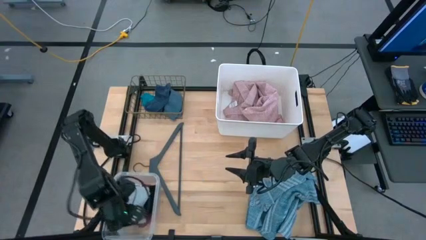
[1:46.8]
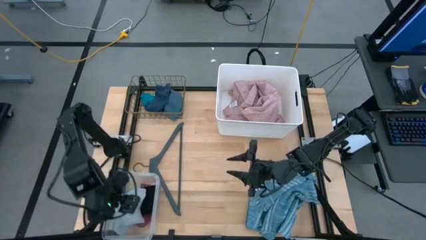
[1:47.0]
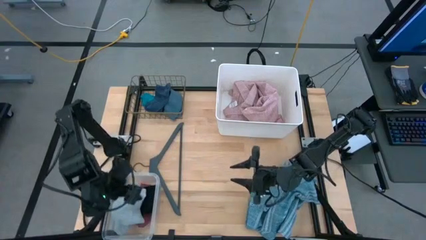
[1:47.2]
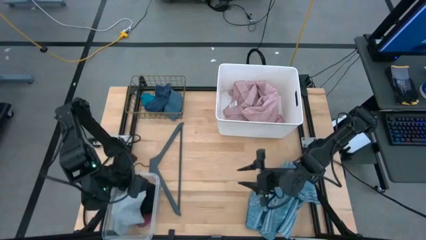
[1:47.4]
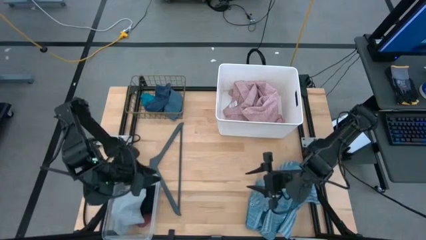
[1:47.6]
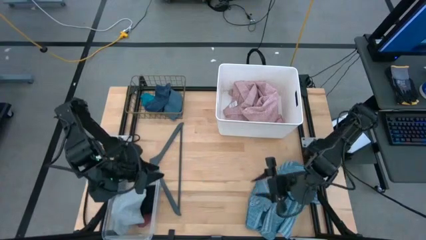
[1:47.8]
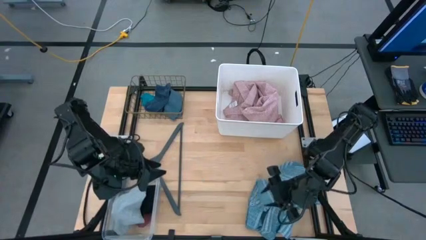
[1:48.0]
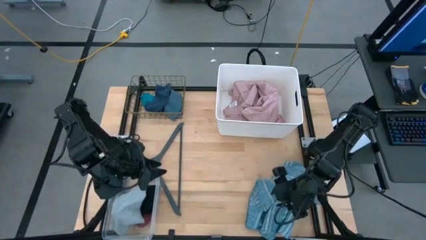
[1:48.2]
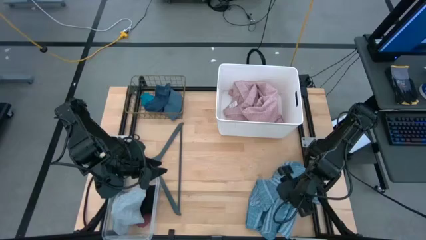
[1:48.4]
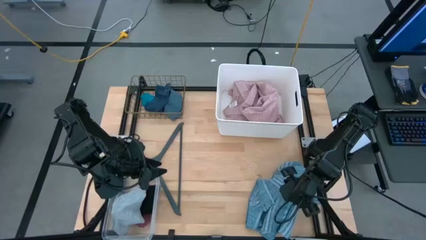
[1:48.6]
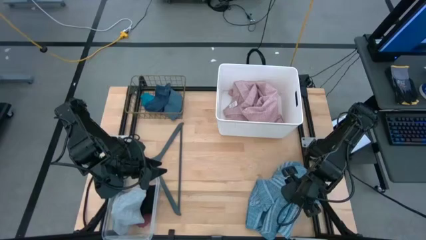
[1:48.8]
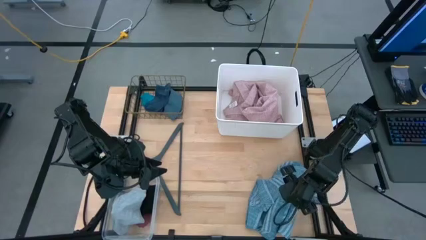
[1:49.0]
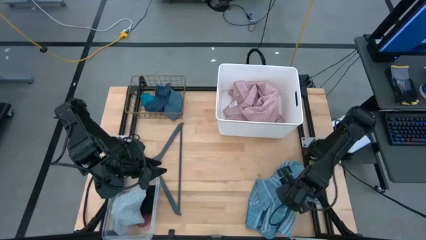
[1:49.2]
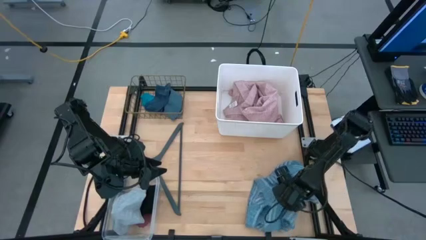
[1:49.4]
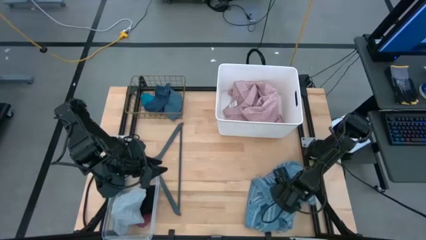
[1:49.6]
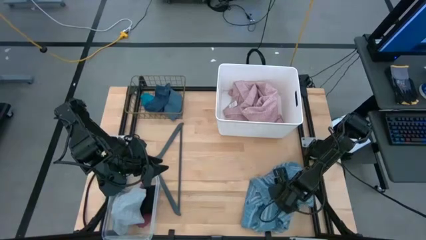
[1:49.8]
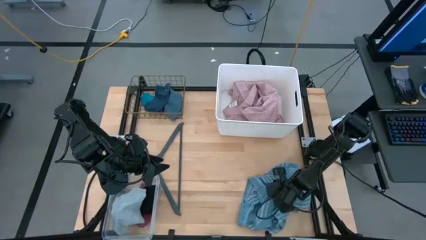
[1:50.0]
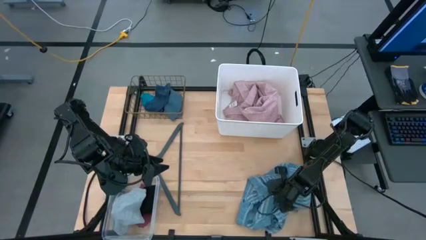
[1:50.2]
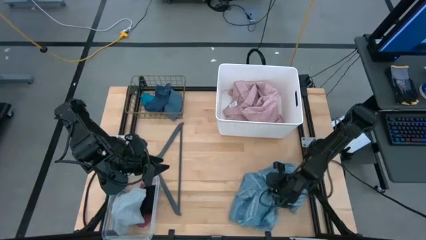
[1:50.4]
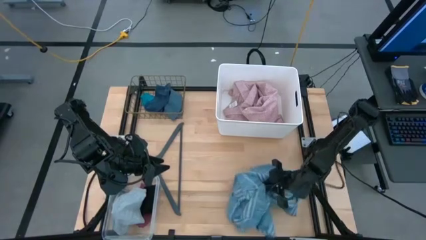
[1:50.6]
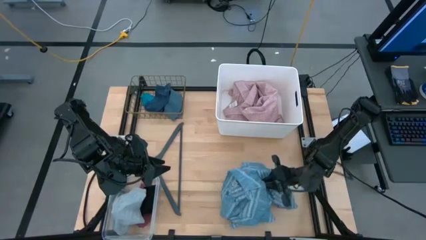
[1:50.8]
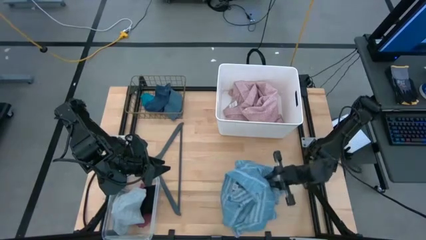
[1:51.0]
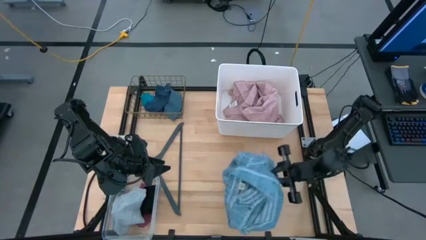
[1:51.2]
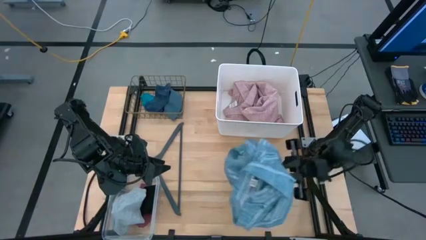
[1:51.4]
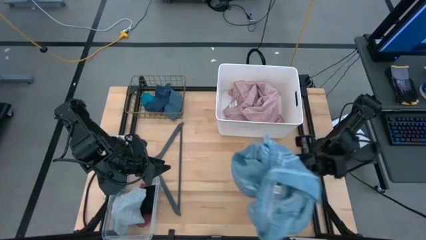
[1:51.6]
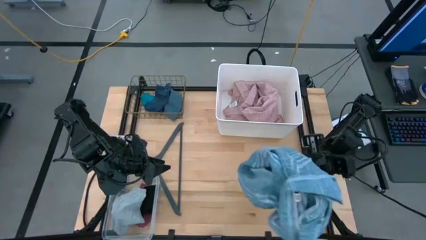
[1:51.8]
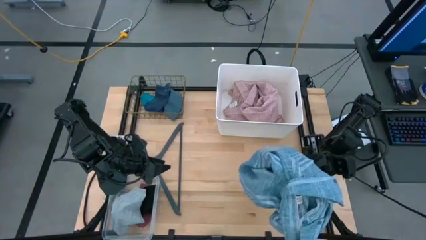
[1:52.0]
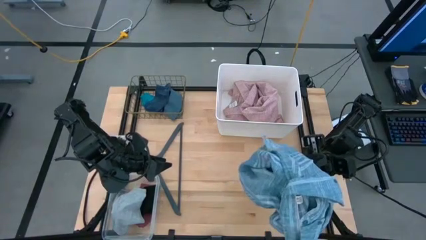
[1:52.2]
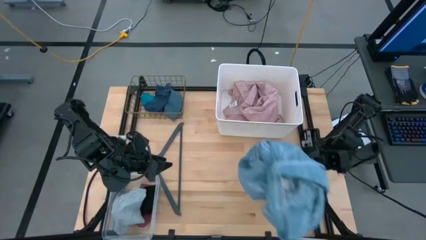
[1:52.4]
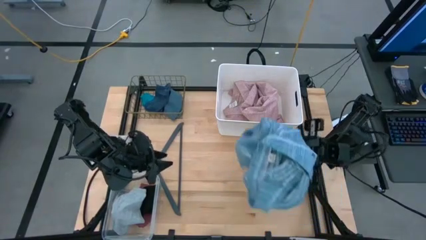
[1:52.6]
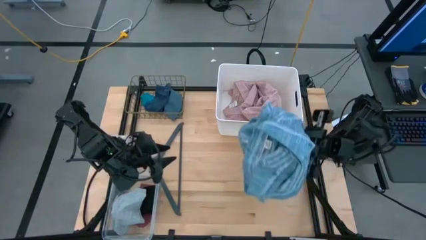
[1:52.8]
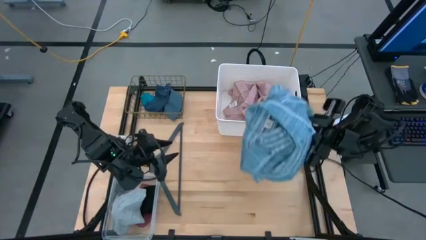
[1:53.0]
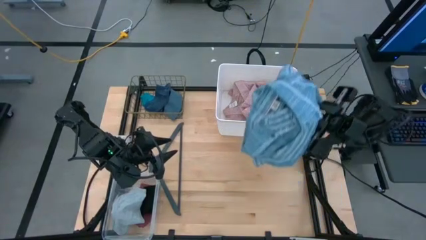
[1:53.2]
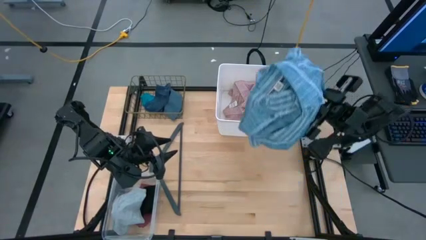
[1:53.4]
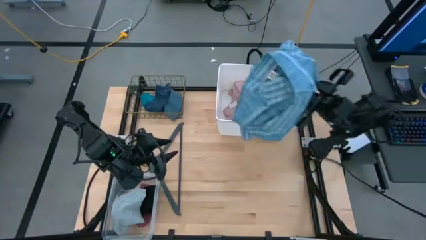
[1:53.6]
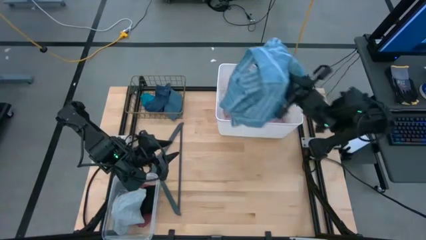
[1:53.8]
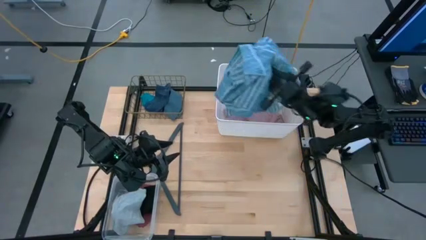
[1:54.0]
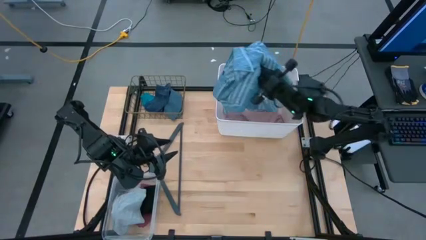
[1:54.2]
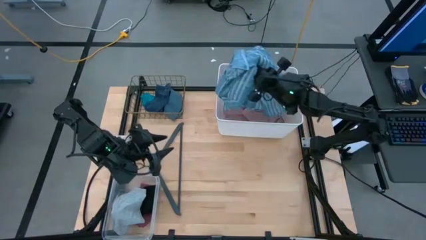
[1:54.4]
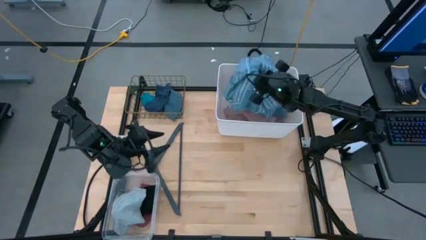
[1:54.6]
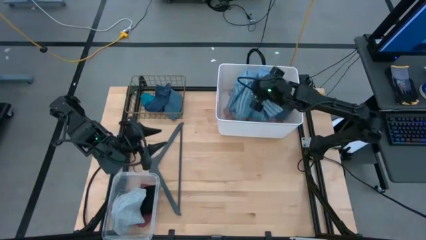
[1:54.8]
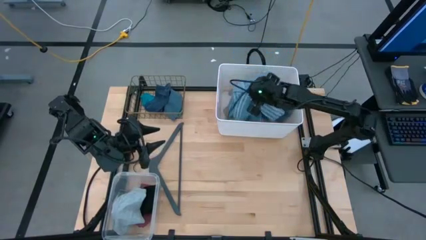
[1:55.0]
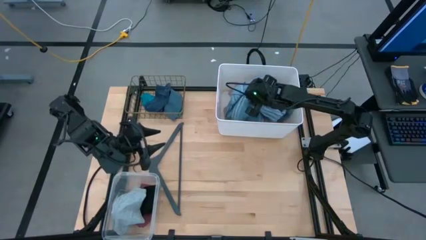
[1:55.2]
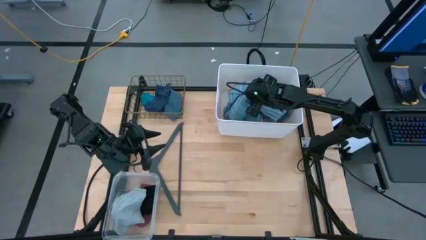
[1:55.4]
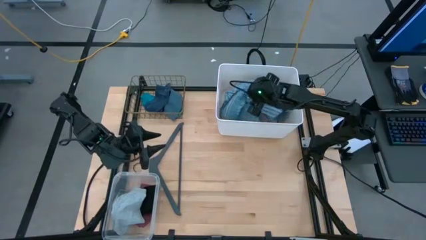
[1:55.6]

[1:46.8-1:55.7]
Task: Pick & Place Cloths
Put the blue long sleeve in the white bin

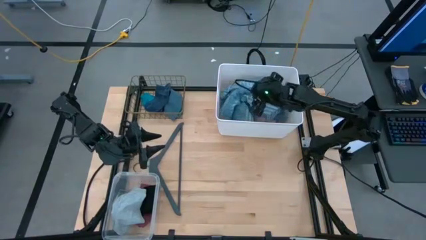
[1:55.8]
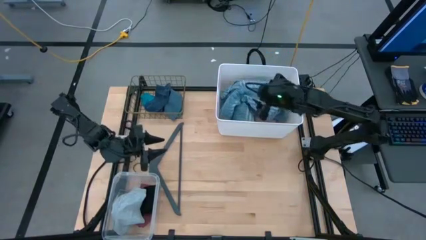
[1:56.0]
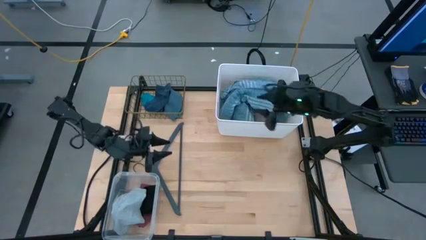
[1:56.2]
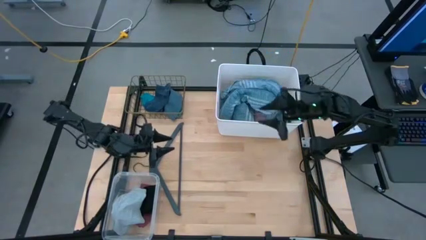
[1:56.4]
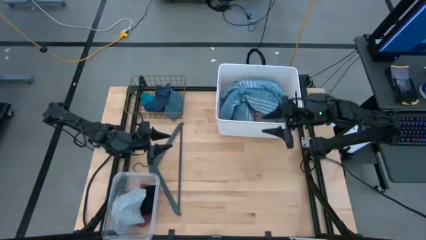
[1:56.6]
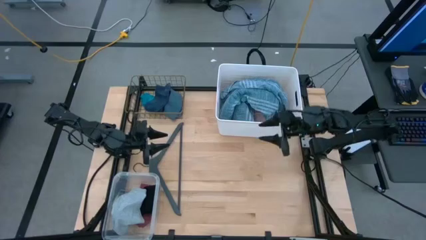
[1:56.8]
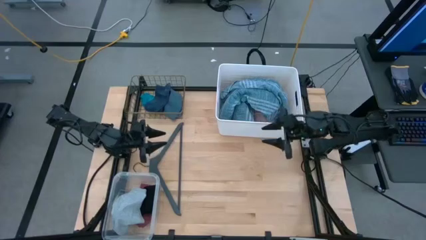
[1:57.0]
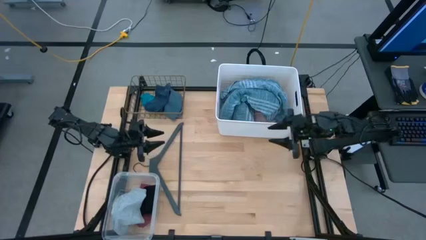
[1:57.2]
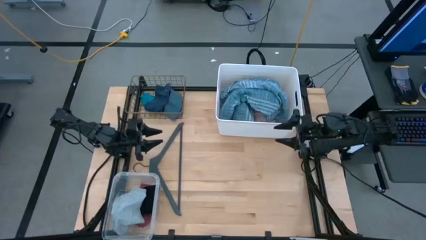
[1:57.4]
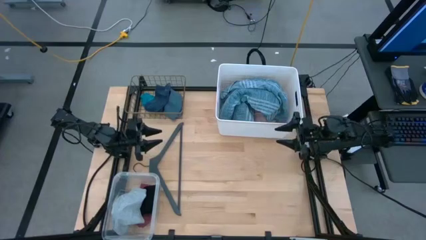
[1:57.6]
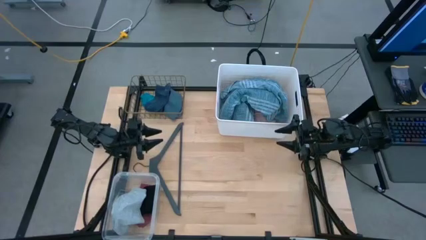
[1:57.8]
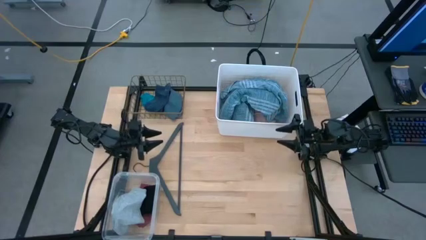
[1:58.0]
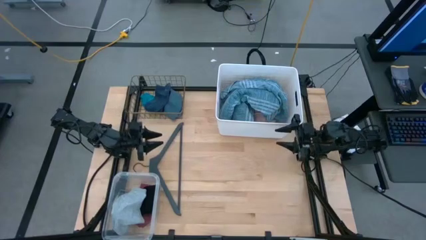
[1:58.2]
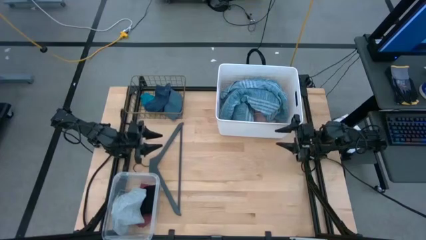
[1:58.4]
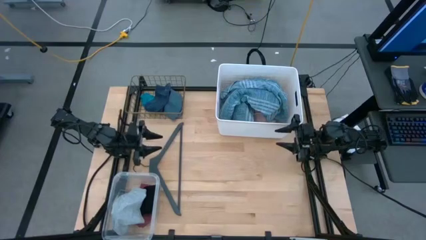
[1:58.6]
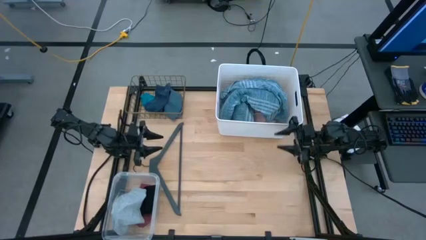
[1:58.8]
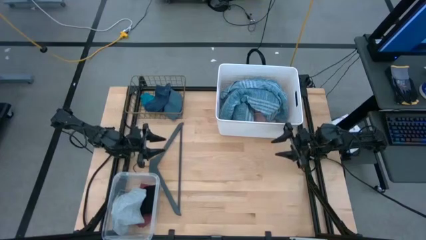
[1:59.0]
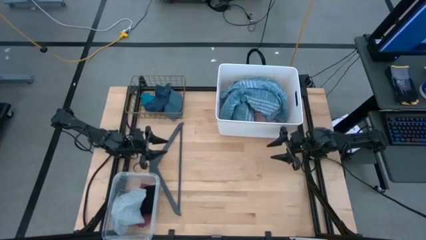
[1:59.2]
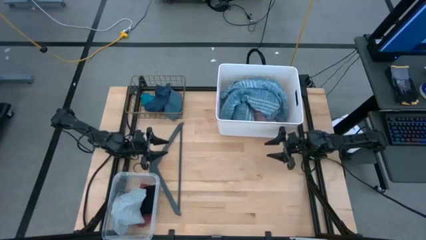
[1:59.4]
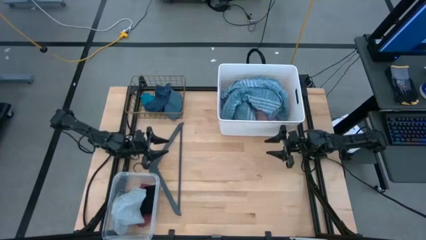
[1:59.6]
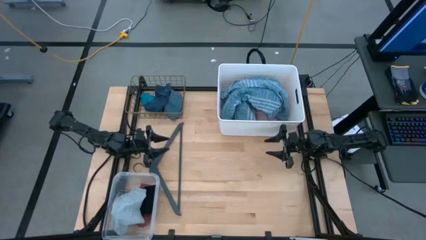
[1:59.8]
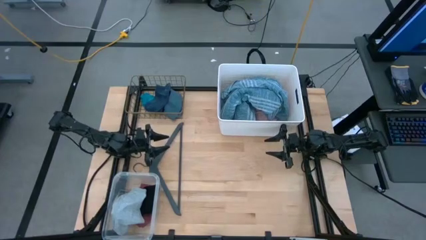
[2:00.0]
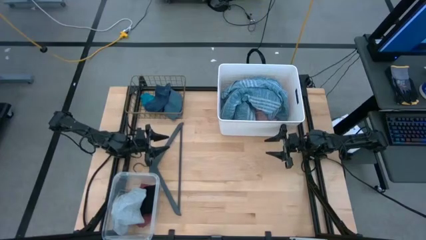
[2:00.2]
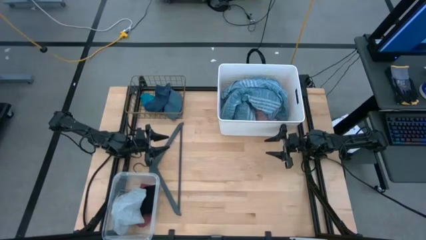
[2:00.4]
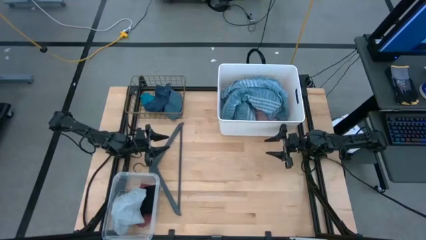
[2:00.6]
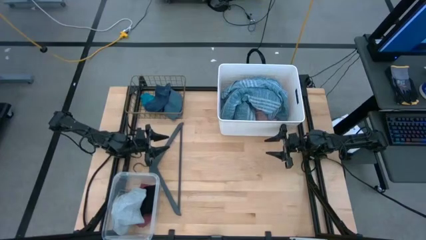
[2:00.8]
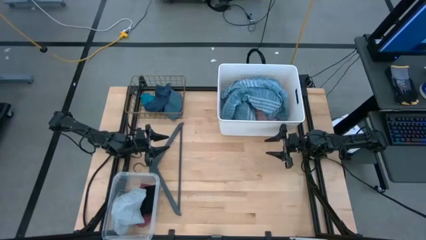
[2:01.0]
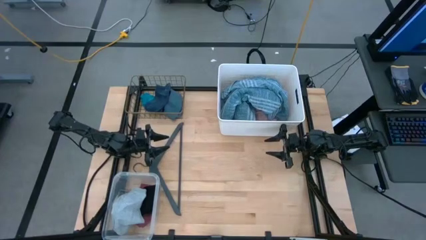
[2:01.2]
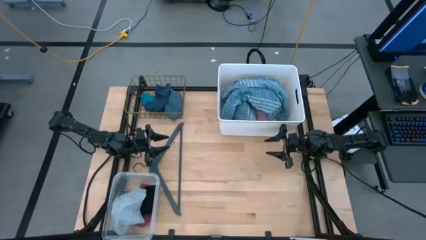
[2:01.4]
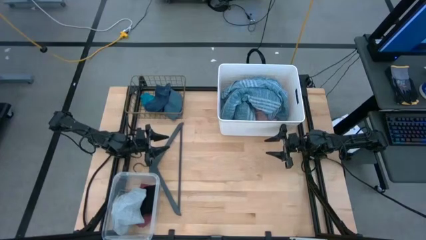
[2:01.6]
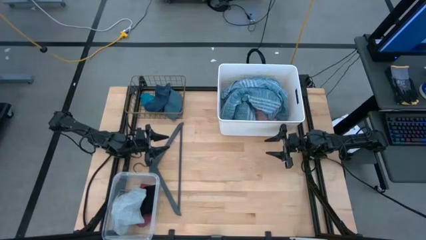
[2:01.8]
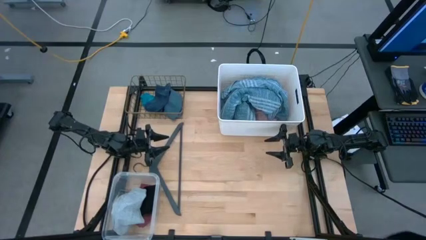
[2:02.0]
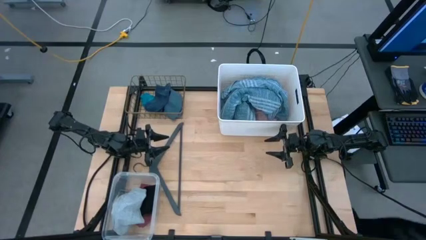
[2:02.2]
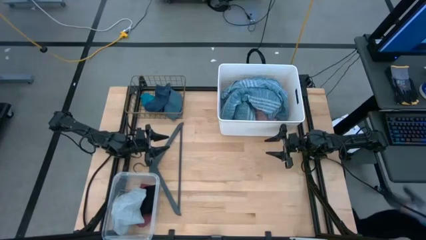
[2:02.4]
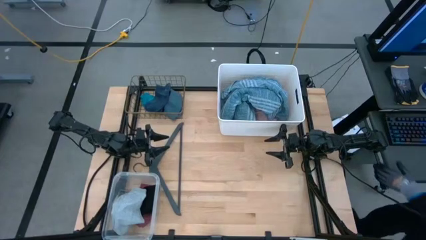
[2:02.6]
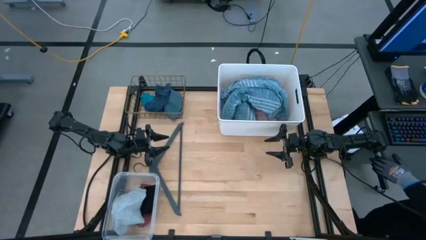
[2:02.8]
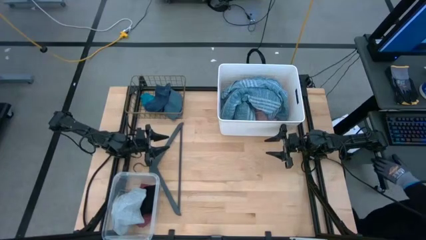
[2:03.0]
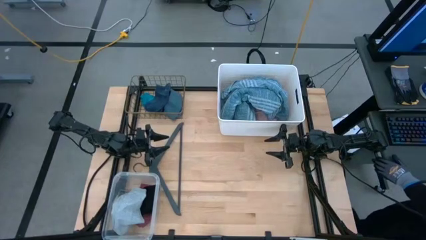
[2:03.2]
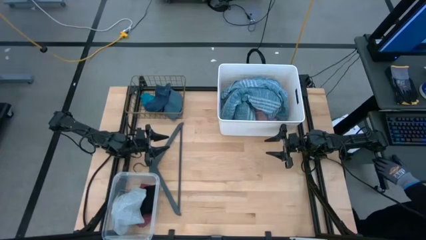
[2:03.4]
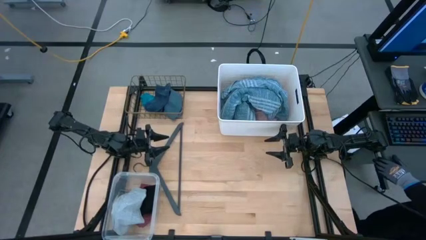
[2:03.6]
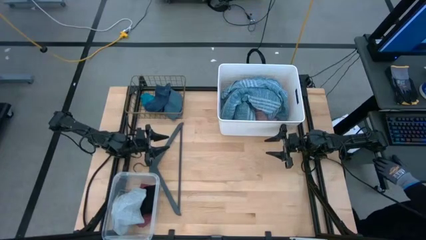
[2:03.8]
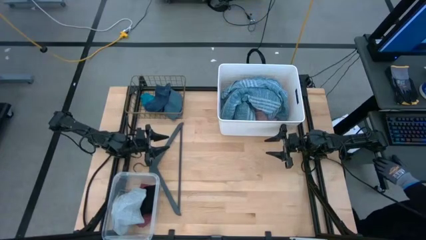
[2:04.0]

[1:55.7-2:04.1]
Return to Home Position

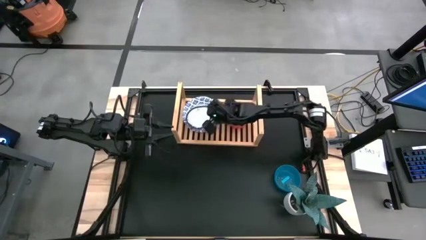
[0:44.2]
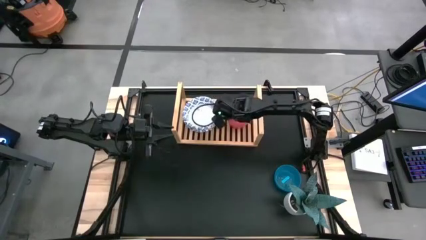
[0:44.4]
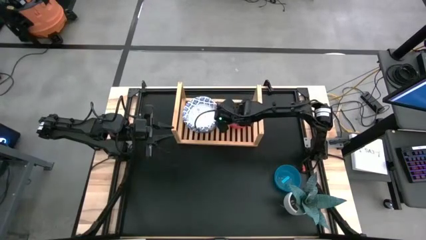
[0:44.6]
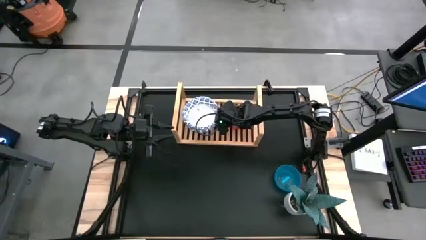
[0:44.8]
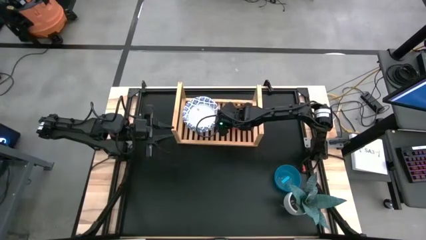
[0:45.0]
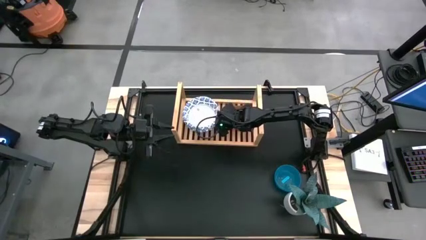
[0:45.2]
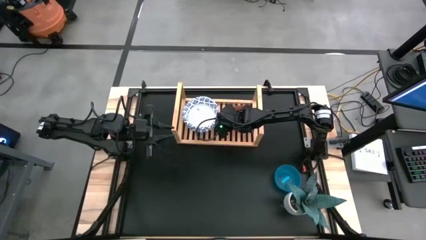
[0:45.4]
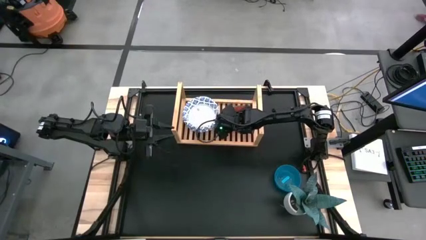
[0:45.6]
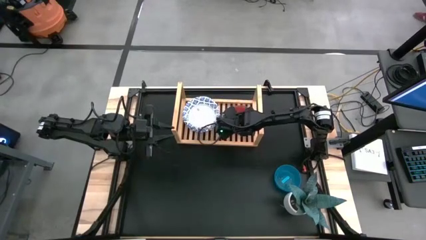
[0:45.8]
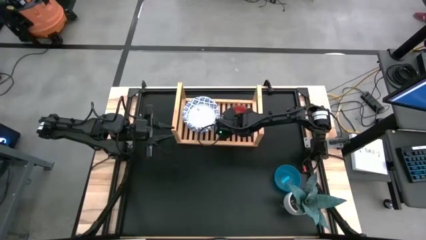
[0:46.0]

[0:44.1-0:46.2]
Task: Place and stack bowls onto a shelf
Adjust the small pink bowl on the shelf
